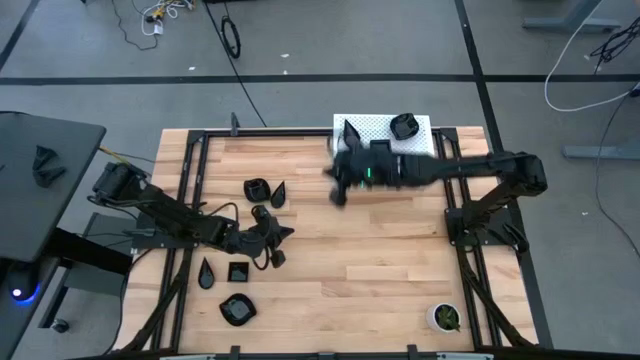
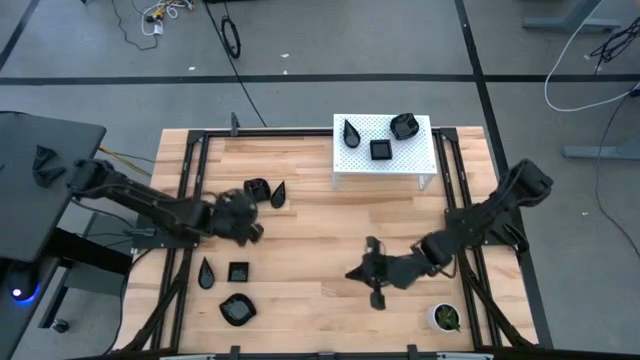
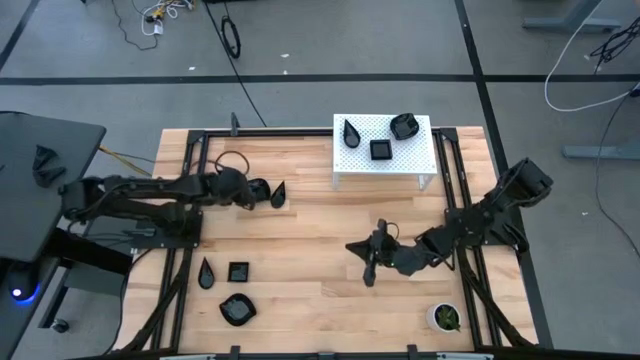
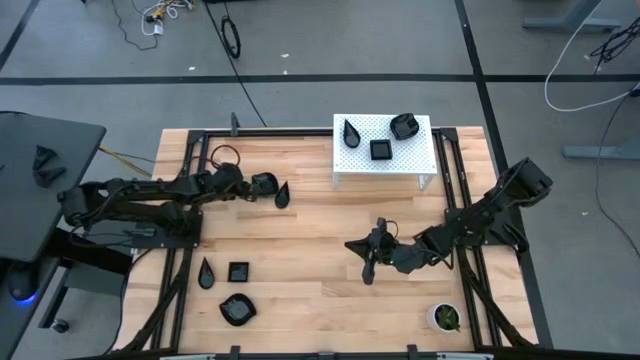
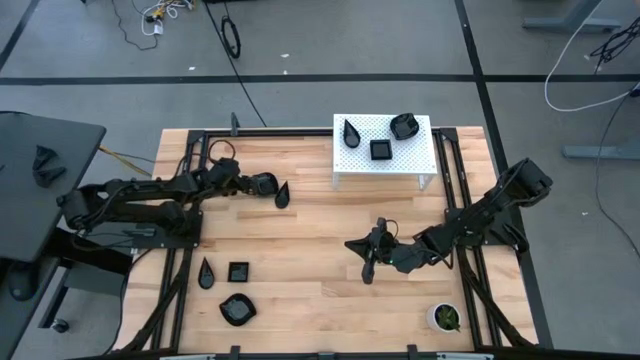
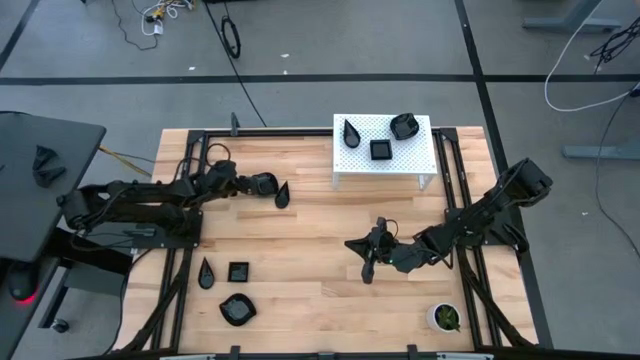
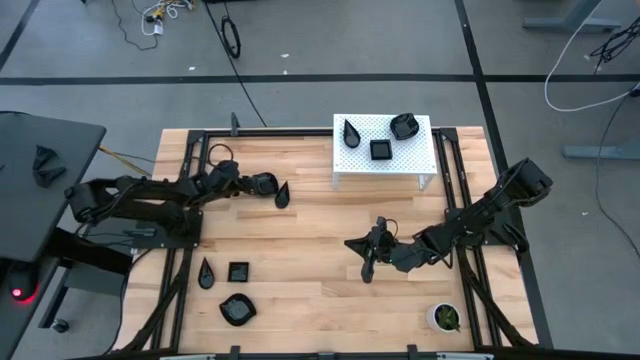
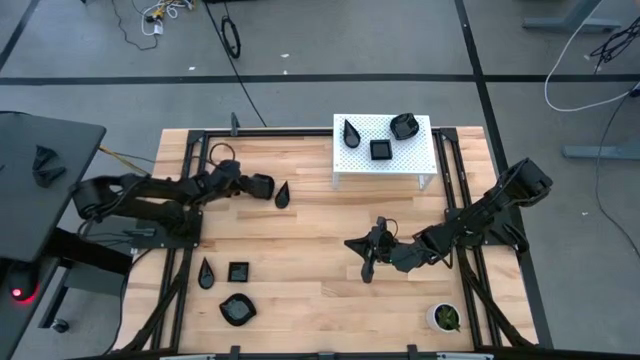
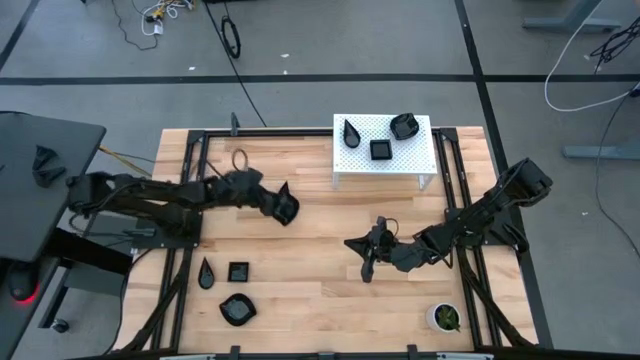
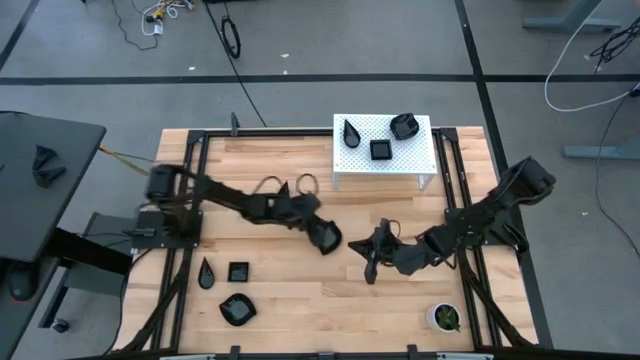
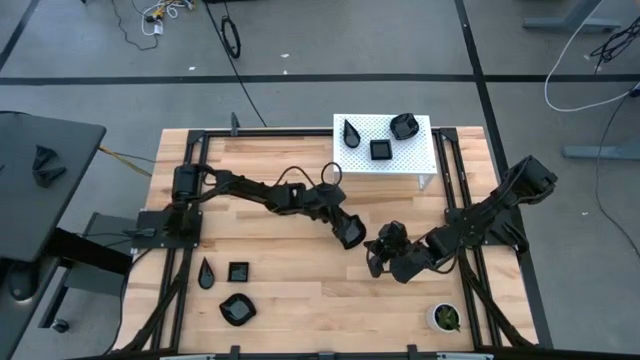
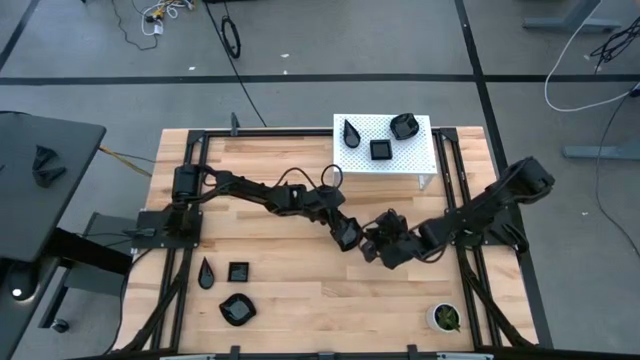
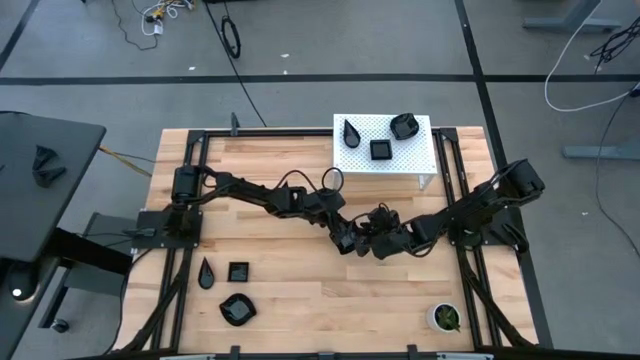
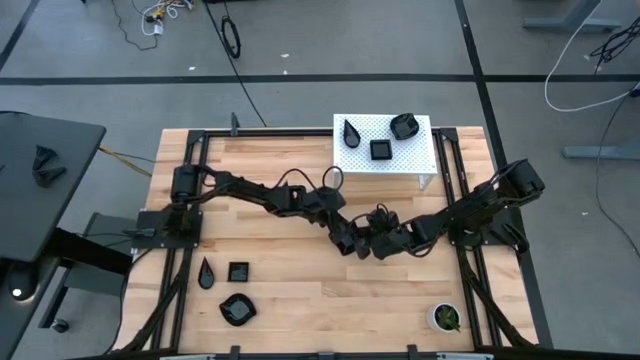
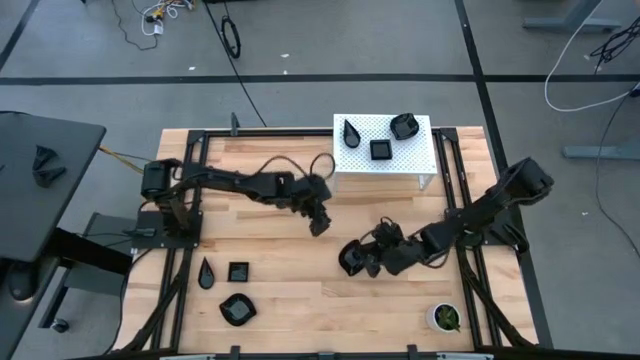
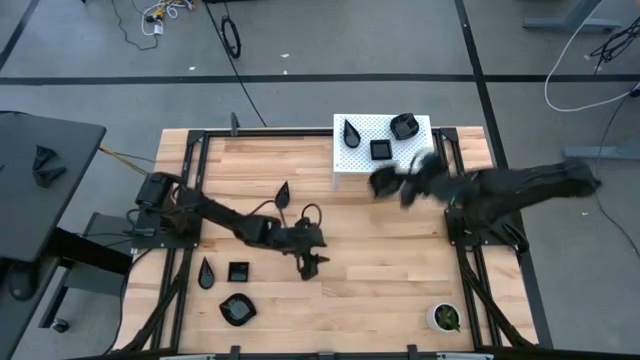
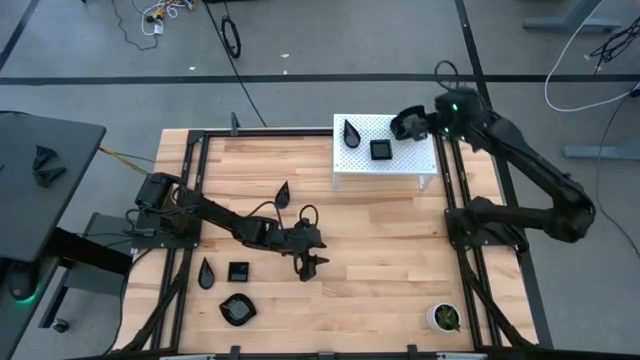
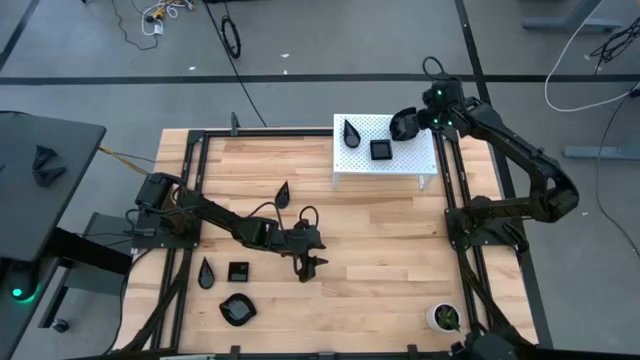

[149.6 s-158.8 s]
Task: Pick & Place Mini shaped plates
Stack the black leaf shaped plate on the black leaf shaped plate on the shelf

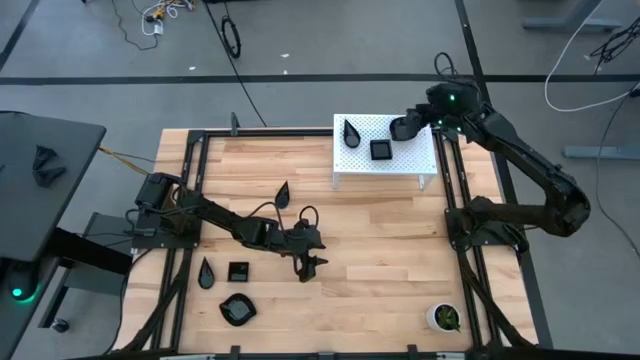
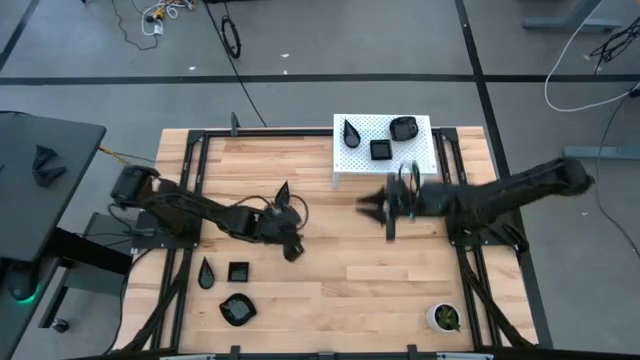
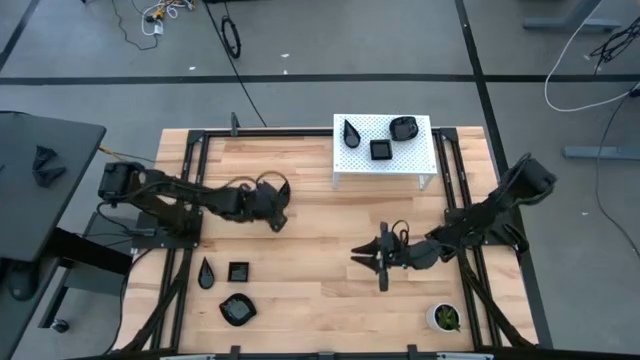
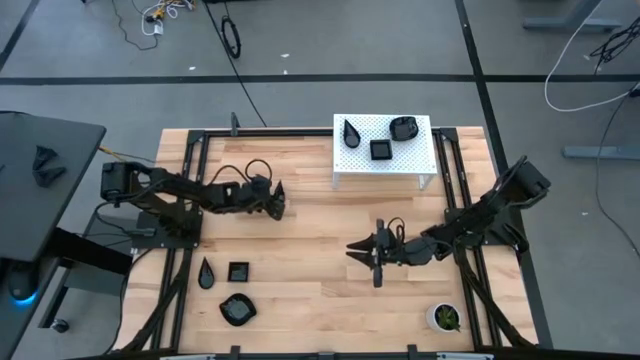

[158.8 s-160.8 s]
Stack the black drop shaped plate on the black drop shaped plate on the shelf

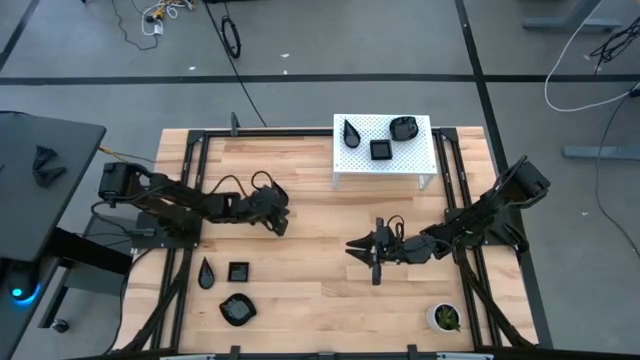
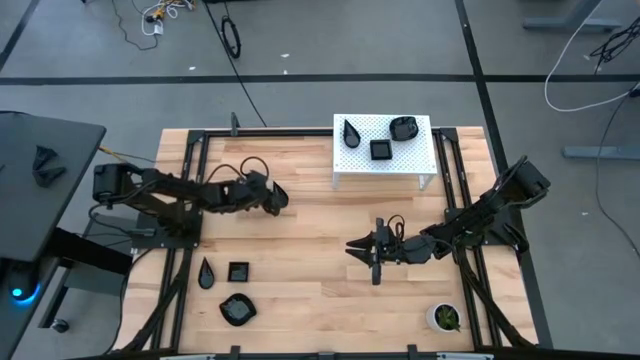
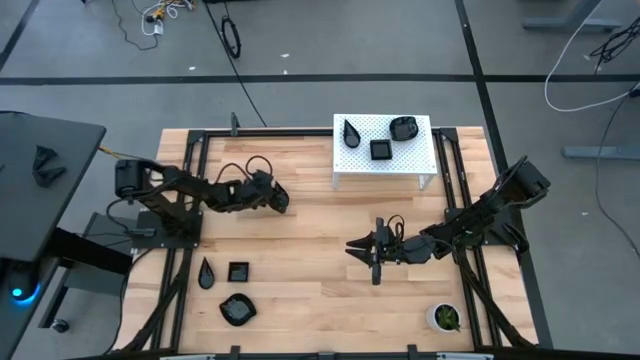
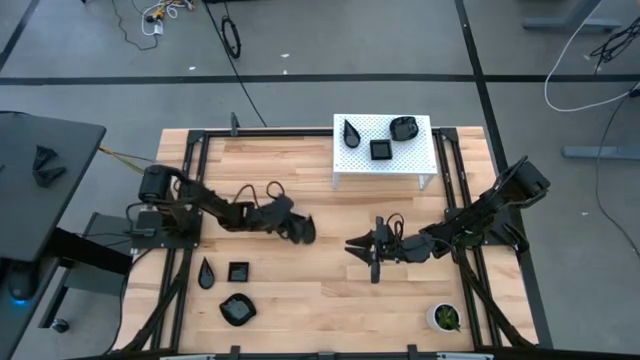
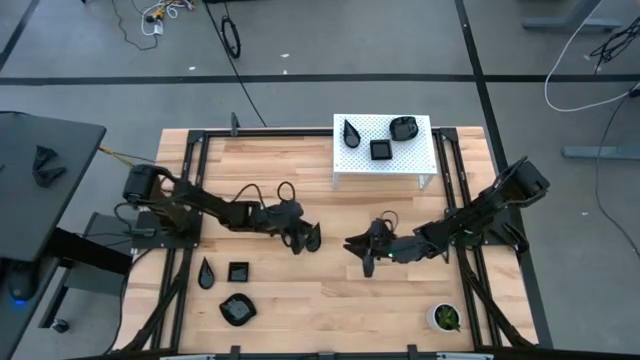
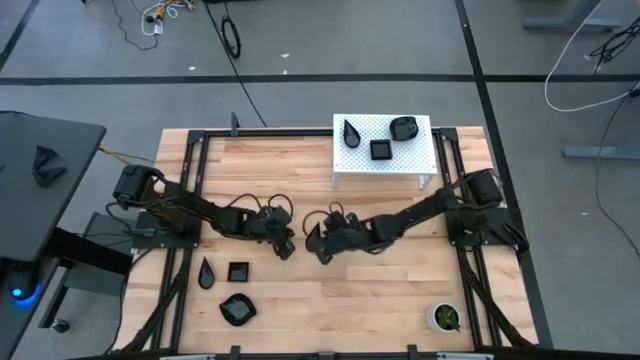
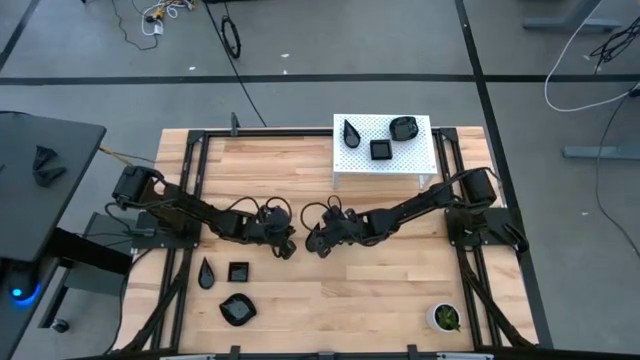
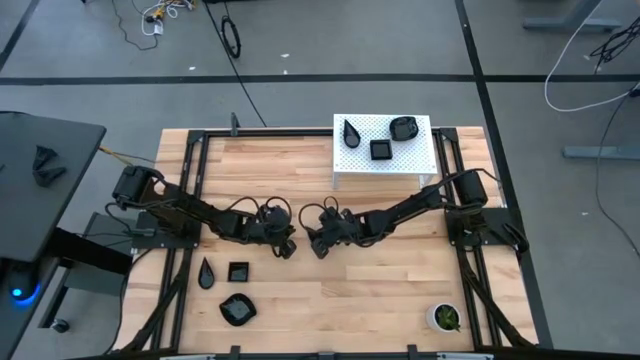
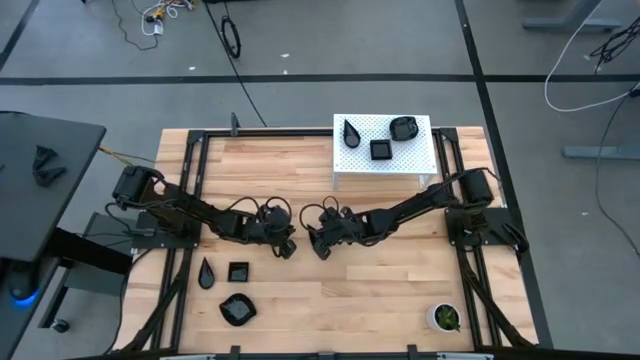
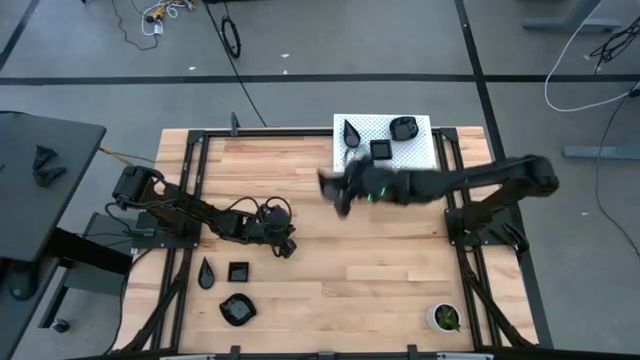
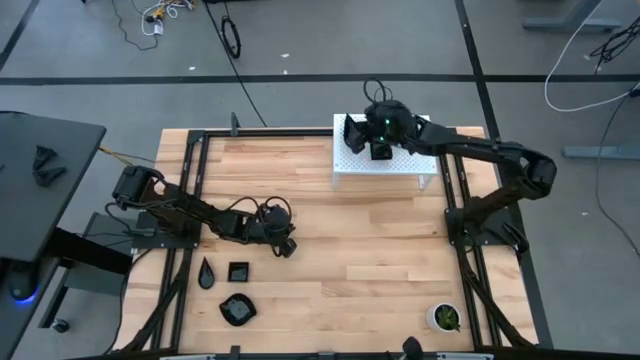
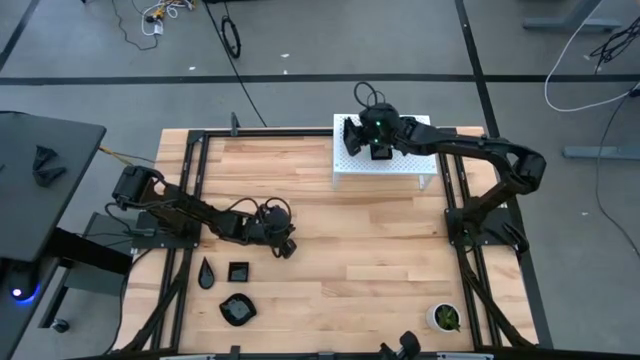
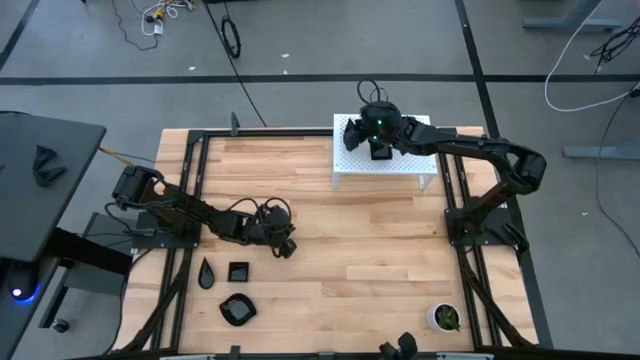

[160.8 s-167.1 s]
Stack the black drop shaped plate on the black drop shaped plate on the shelf

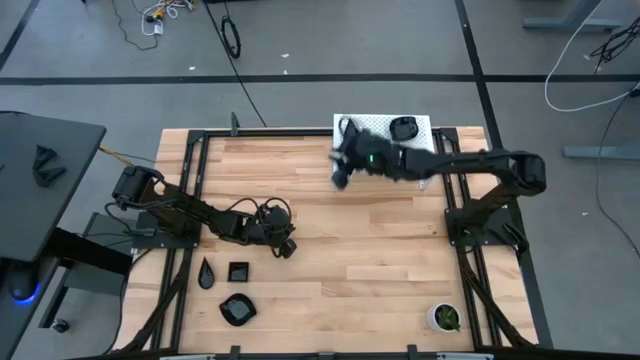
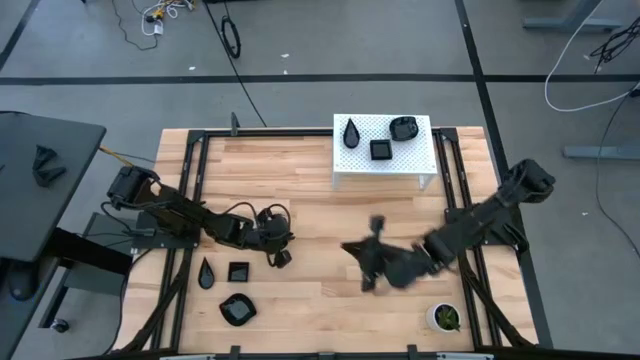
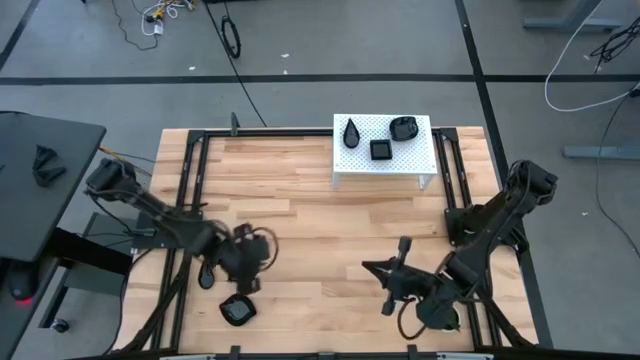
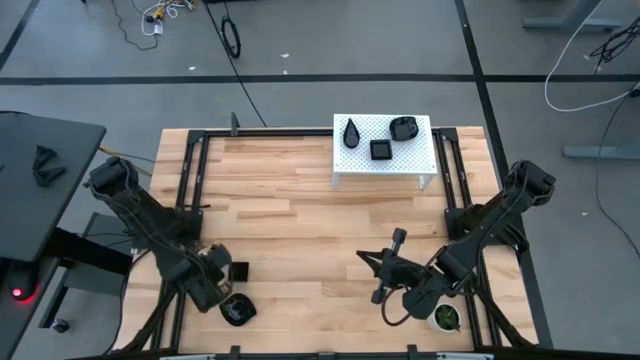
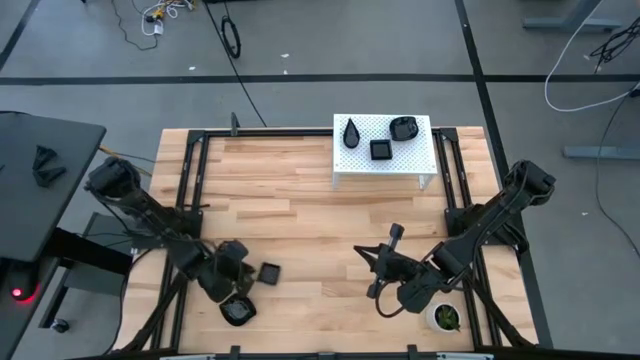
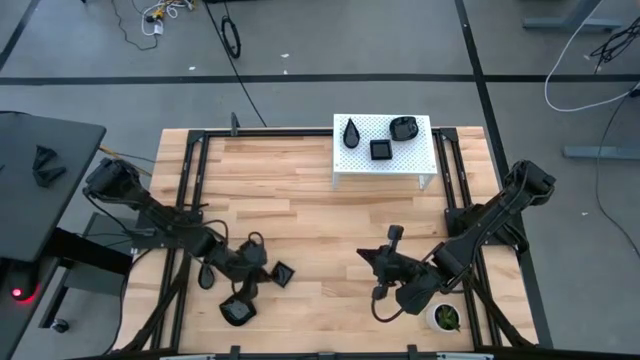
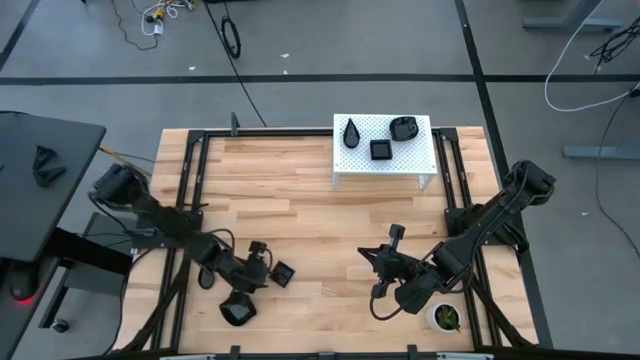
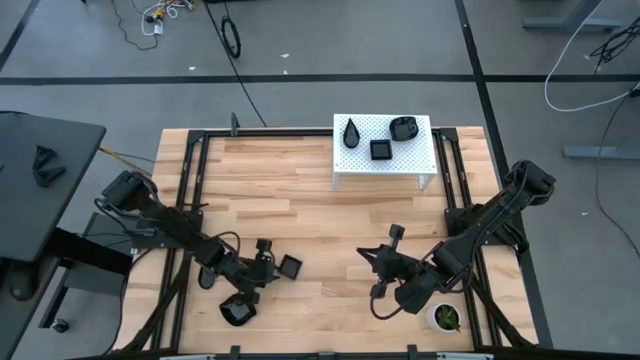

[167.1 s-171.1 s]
Stack the black square plate on the black square plate on the shelf
